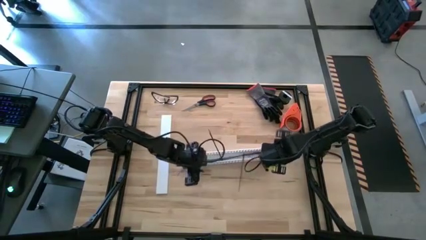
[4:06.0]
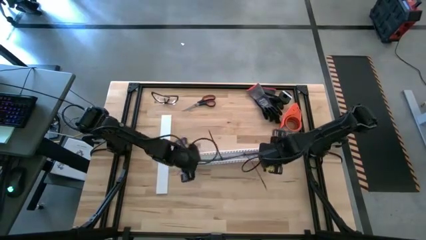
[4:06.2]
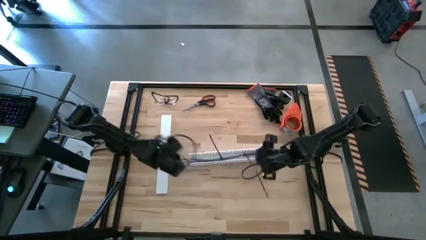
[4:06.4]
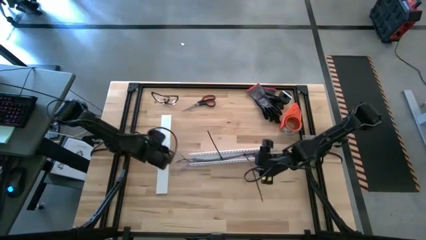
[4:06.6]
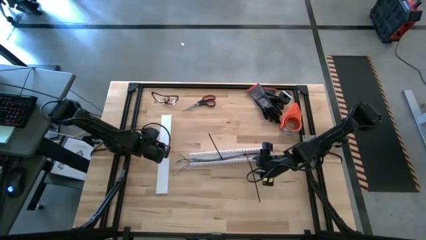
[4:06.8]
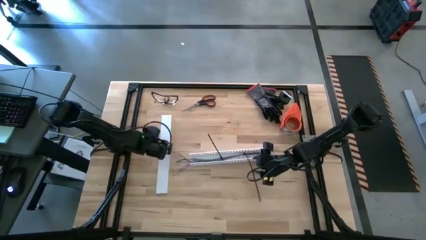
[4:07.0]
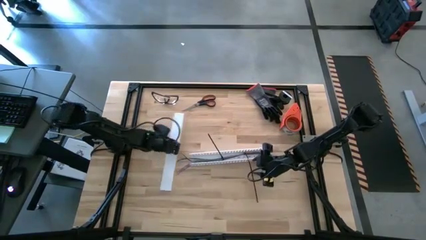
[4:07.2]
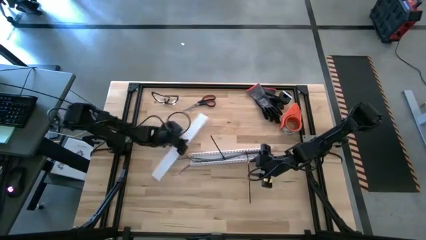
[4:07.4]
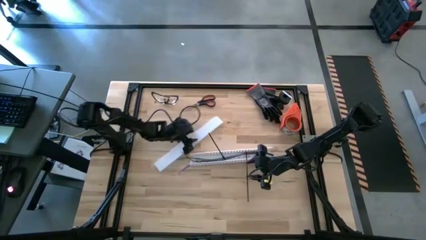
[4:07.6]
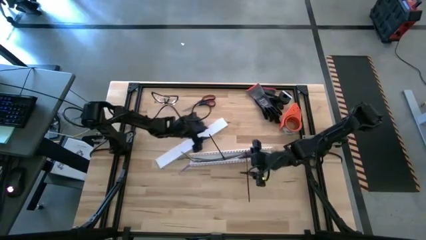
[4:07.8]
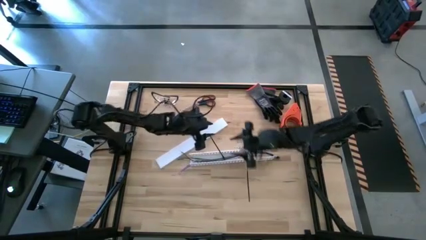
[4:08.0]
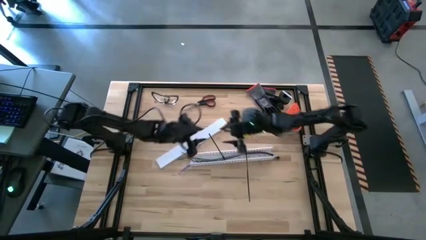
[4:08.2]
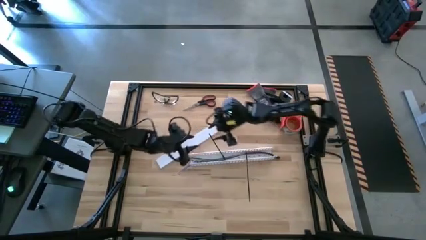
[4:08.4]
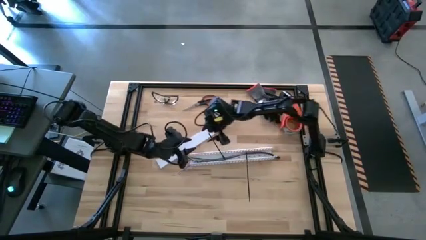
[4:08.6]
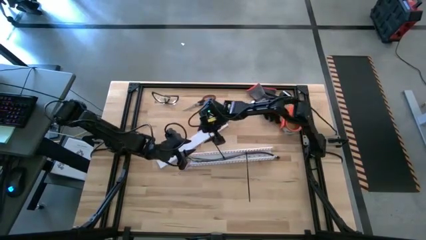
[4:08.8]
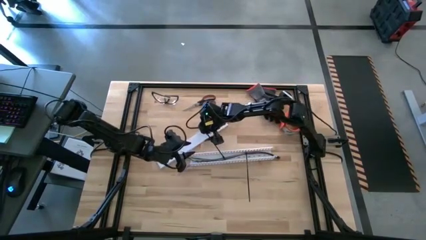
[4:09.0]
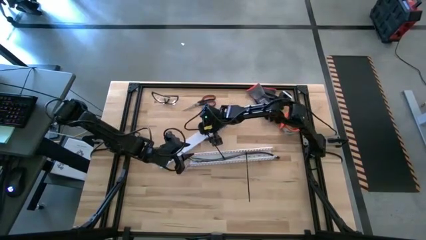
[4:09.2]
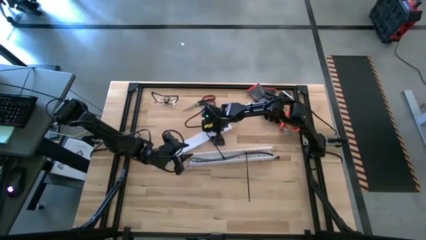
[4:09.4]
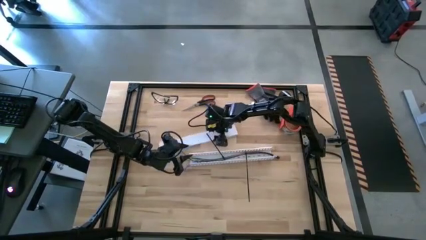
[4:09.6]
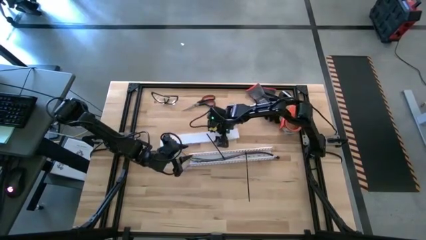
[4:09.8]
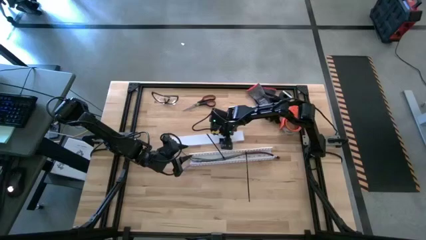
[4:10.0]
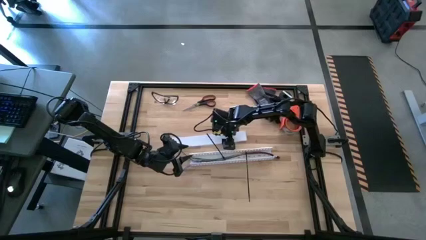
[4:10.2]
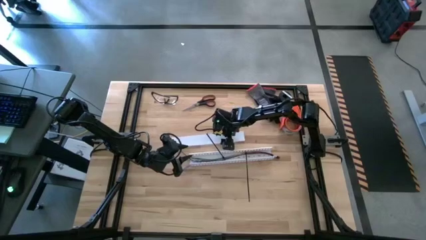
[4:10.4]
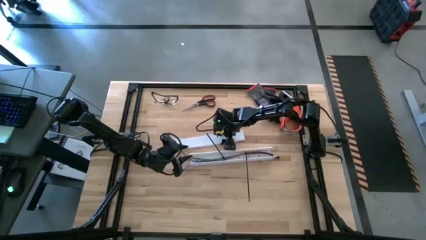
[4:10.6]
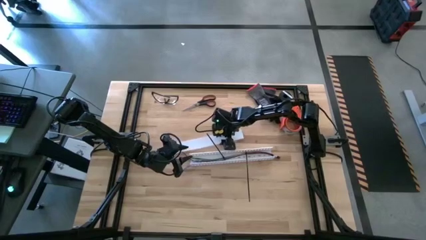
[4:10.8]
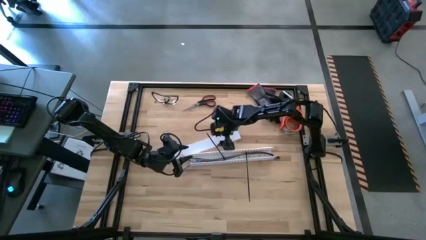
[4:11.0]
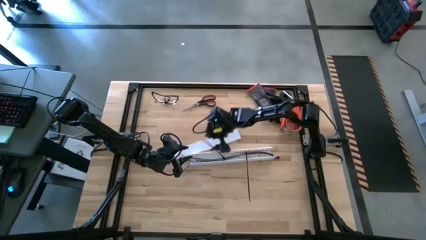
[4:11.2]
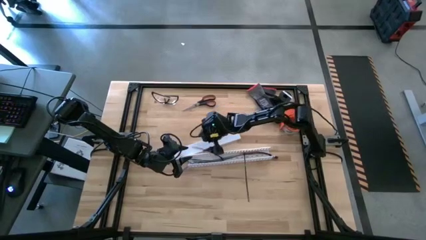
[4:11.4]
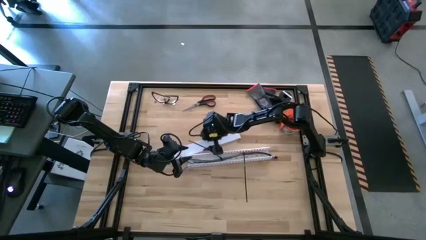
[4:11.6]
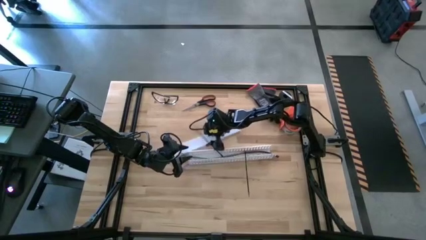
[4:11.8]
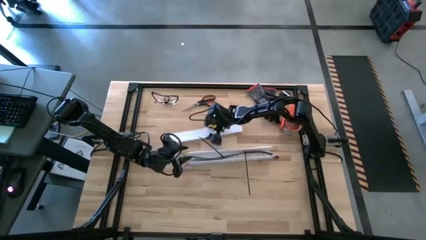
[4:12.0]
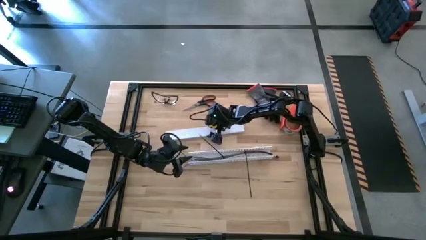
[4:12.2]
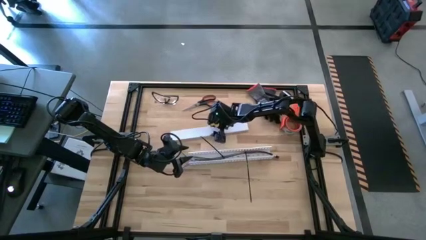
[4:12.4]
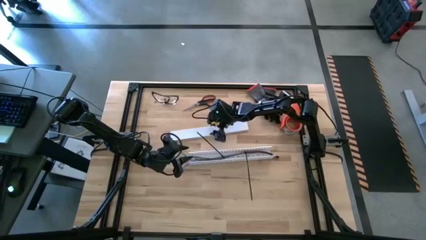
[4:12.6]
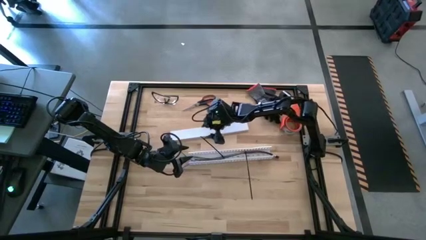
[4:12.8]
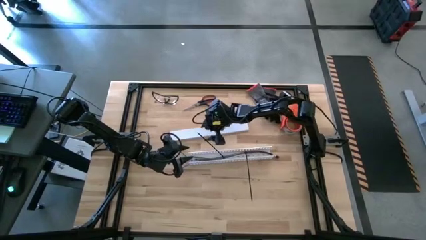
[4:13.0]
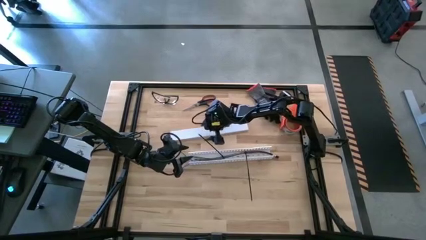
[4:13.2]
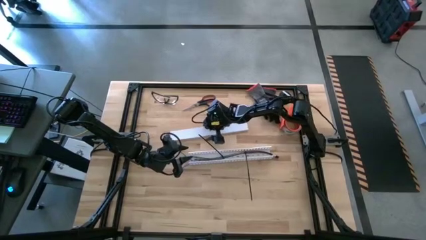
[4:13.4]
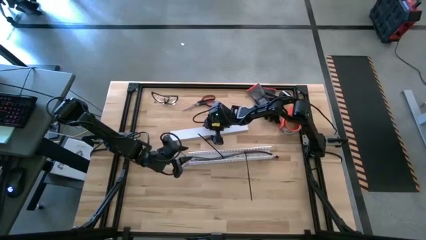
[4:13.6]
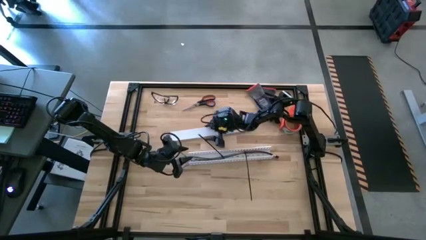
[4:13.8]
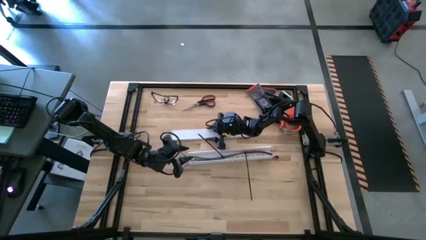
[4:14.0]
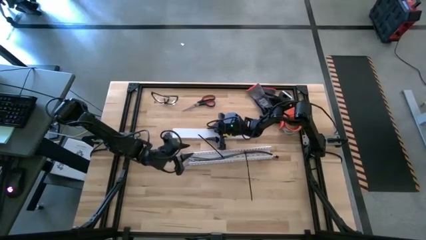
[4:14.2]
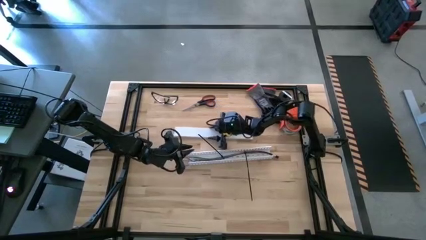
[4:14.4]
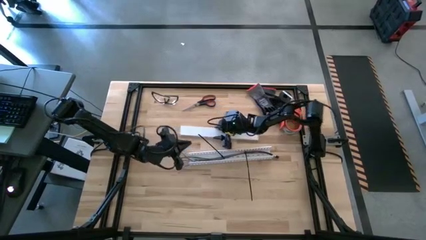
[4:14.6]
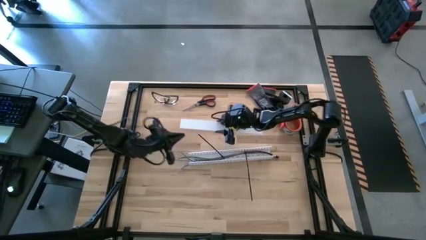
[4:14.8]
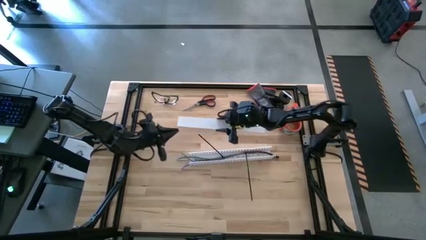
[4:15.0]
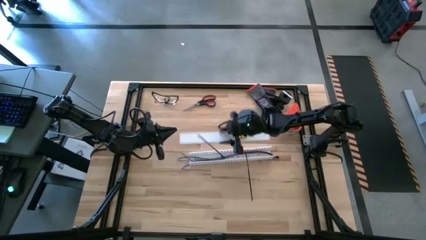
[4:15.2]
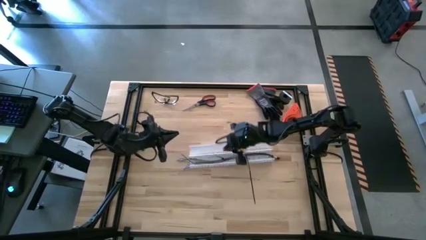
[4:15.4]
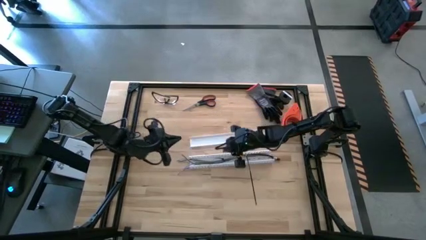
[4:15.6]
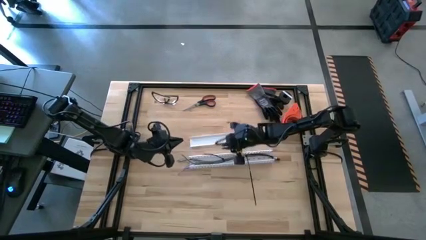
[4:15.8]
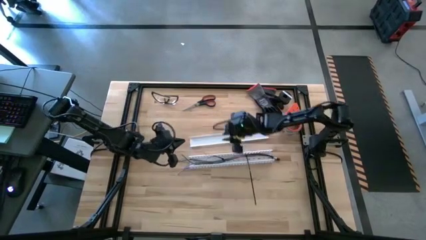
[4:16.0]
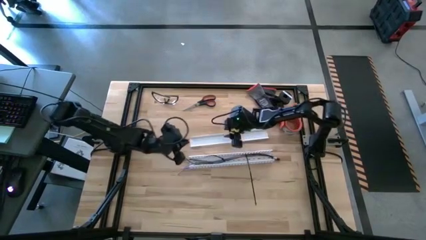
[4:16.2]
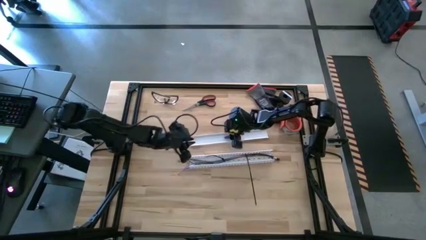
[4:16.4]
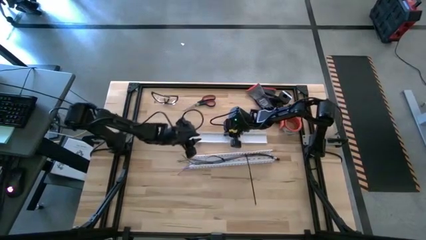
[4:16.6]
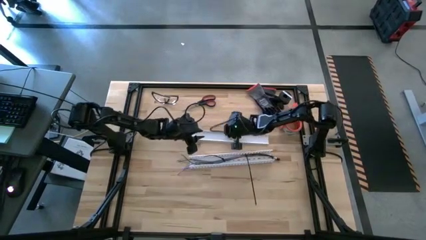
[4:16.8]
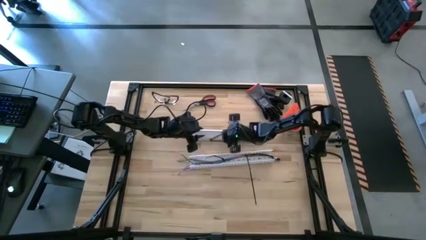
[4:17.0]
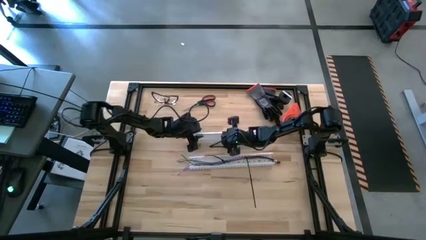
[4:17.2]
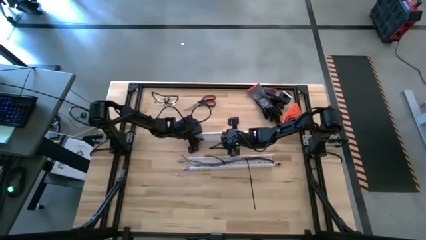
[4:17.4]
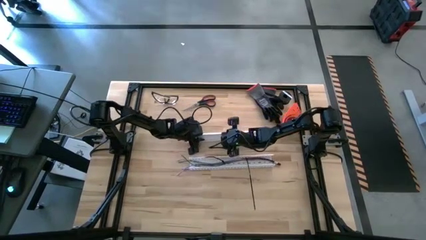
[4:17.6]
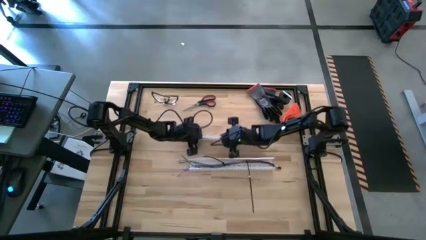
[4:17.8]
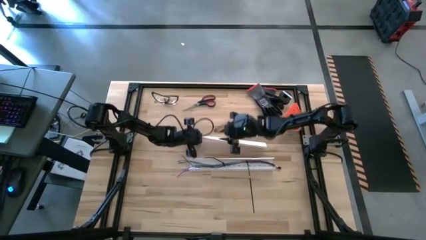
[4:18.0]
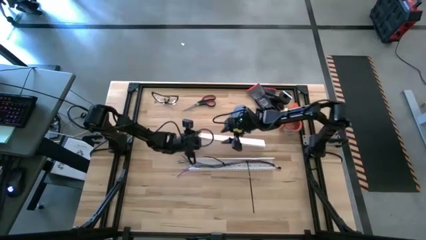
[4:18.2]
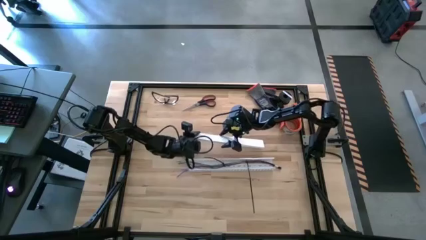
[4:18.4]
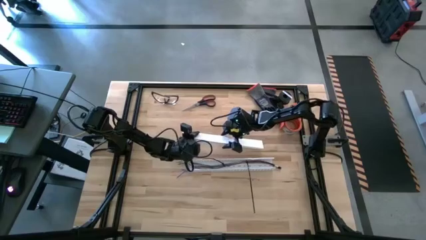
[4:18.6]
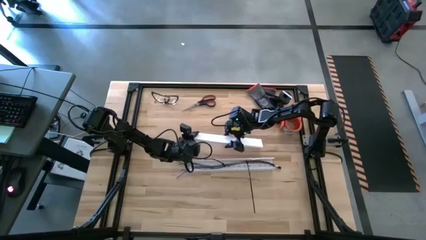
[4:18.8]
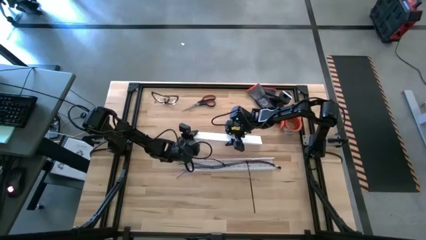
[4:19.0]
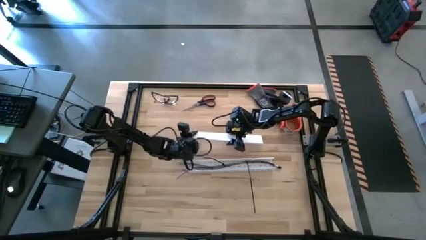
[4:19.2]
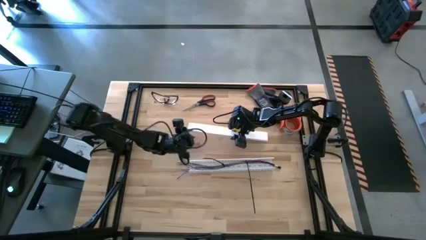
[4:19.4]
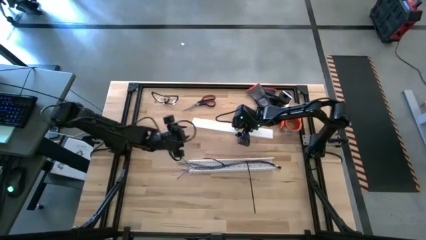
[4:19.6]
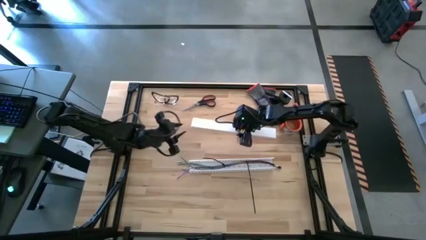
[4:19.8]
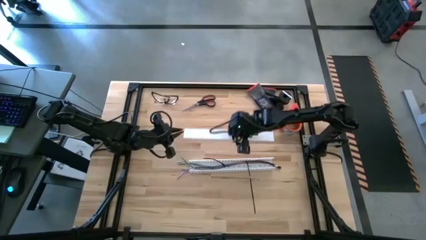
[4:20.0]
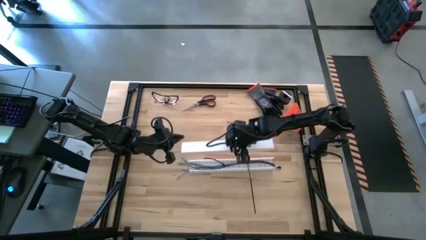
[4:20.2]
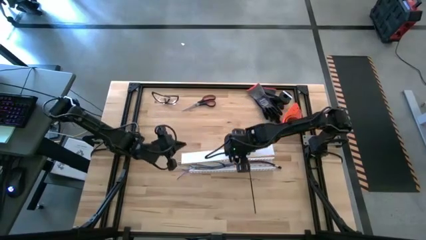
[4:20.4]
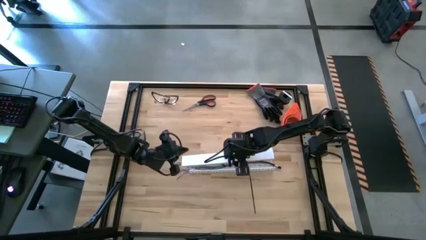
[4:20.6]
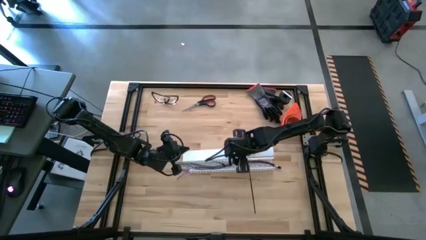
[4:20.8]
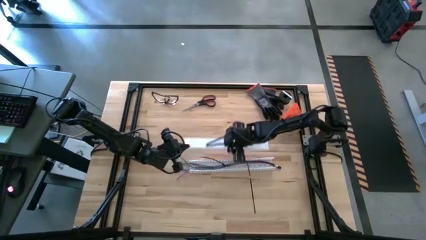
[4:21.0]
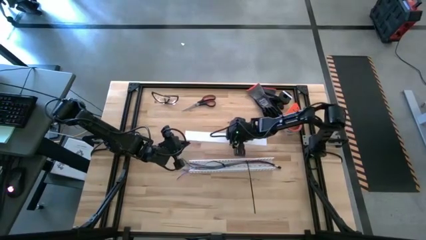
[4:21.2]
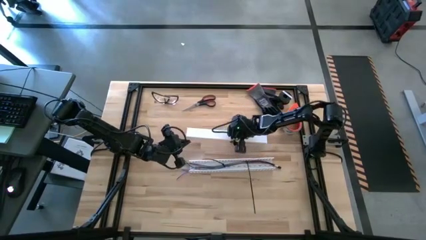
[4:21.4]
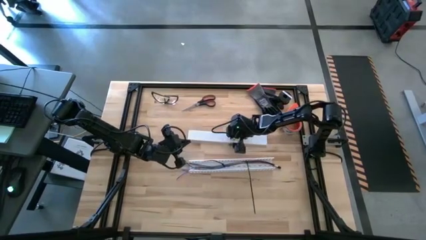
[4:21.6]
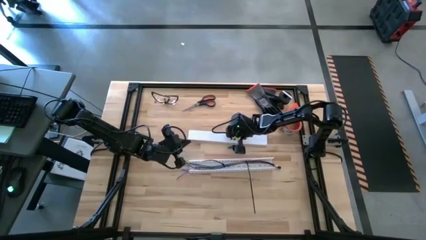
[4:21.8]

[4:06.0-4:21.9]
Task: Ziptie cables
Close the white cable duct
